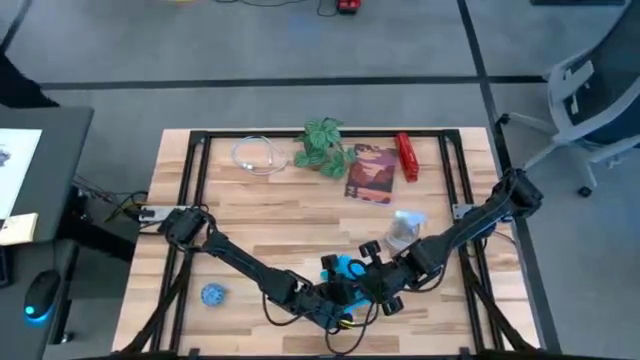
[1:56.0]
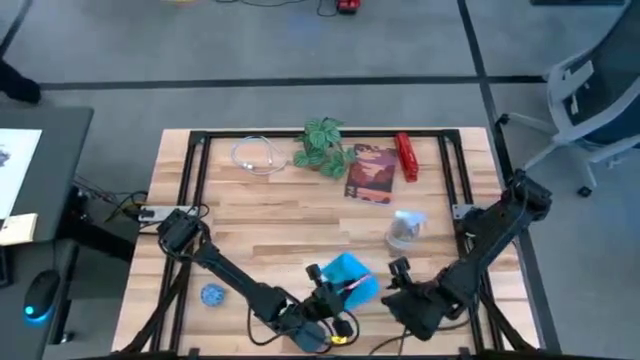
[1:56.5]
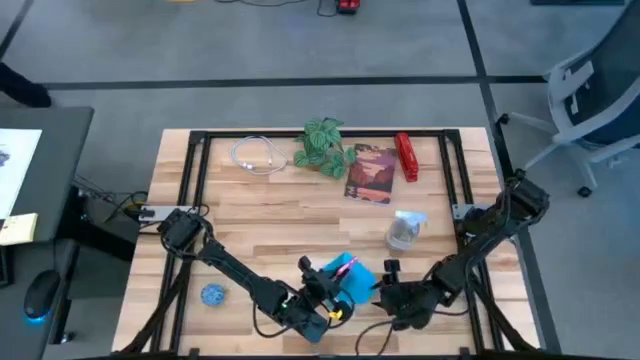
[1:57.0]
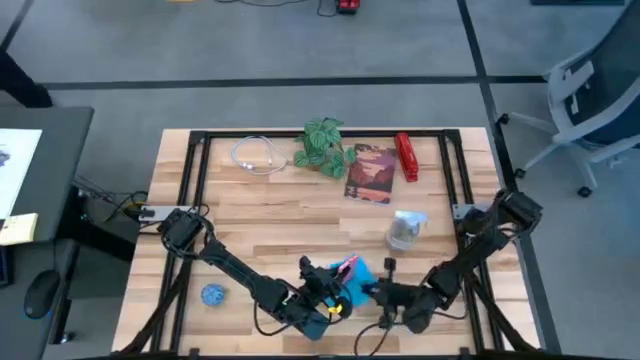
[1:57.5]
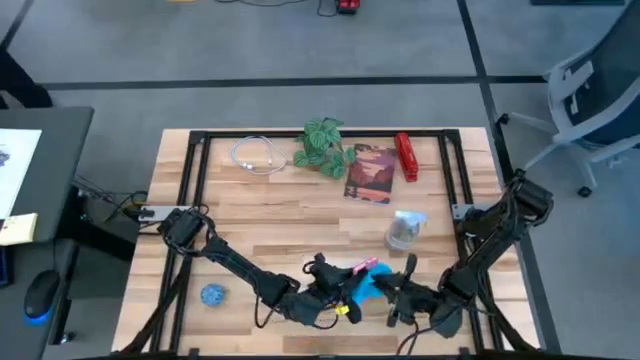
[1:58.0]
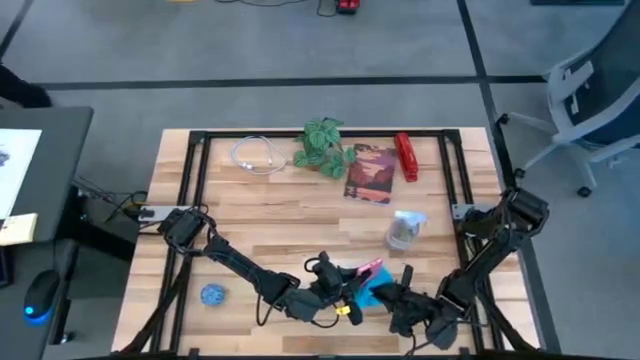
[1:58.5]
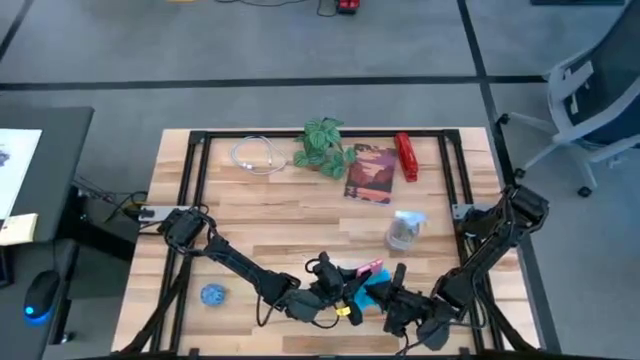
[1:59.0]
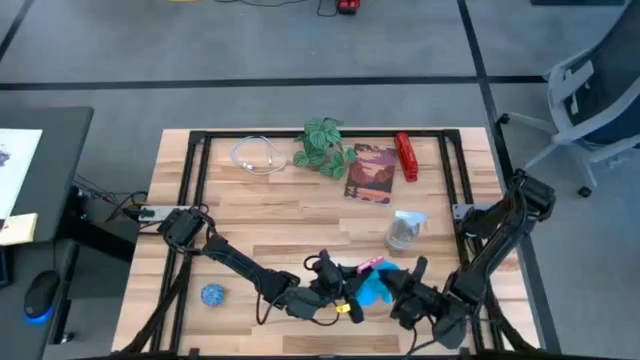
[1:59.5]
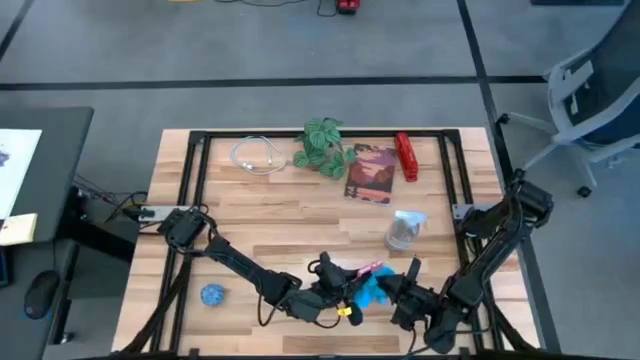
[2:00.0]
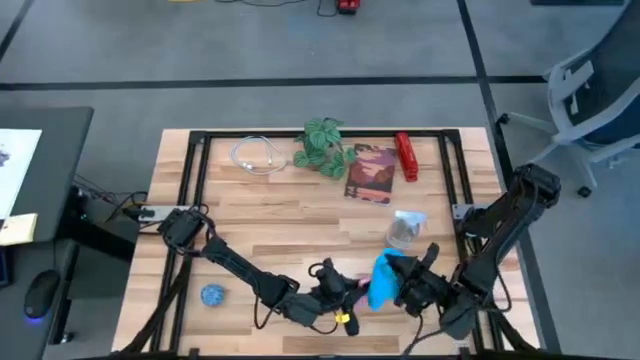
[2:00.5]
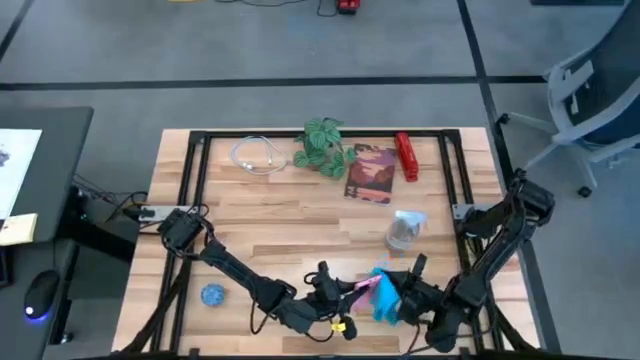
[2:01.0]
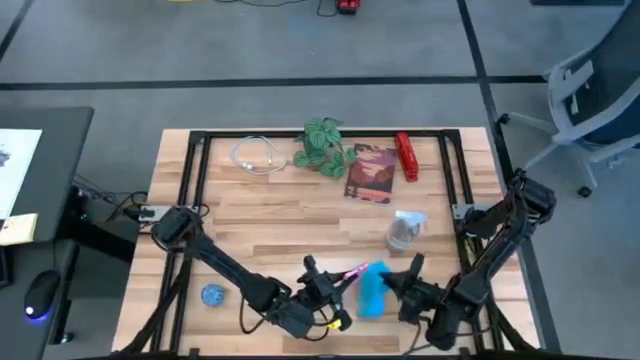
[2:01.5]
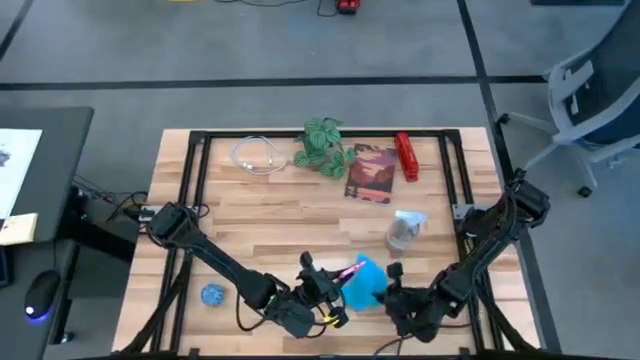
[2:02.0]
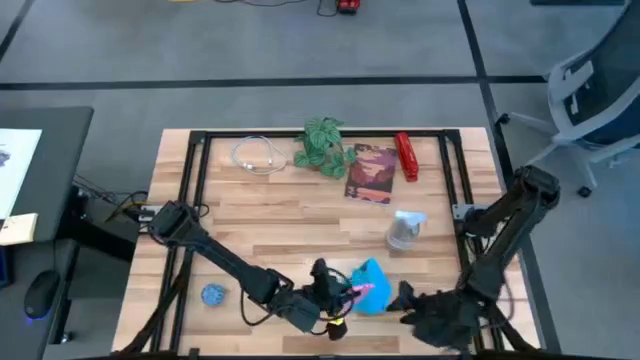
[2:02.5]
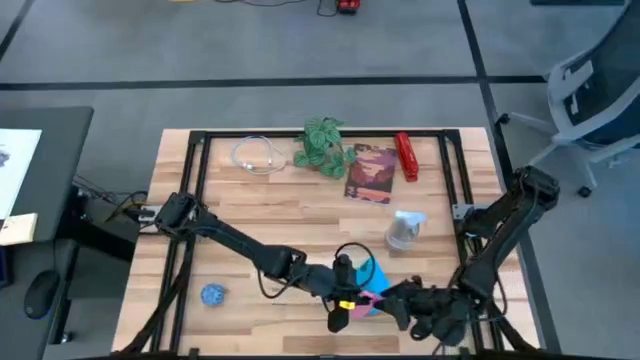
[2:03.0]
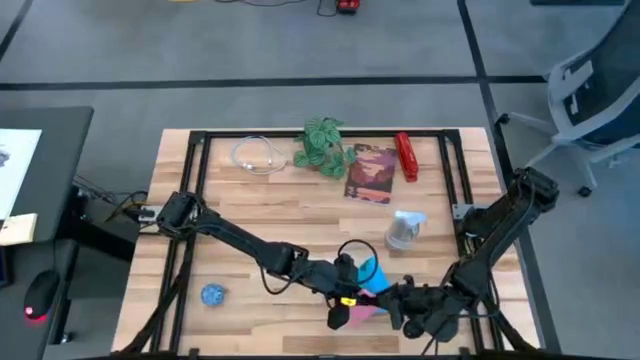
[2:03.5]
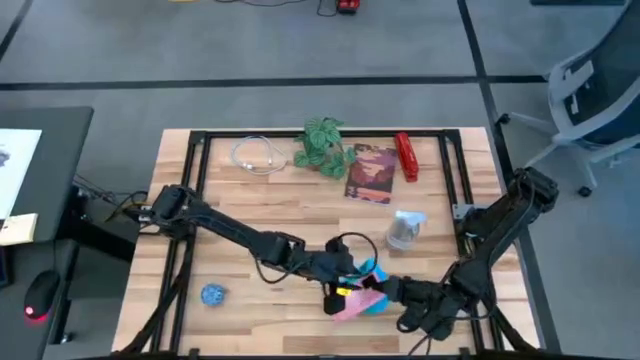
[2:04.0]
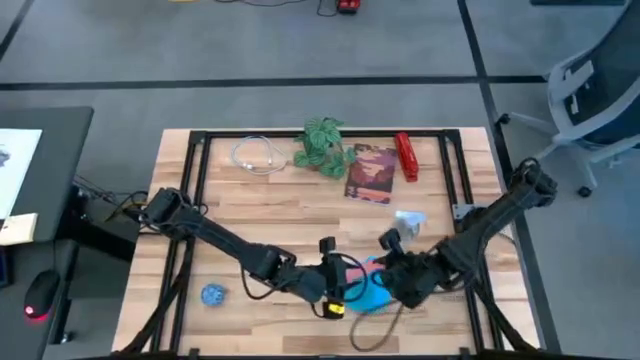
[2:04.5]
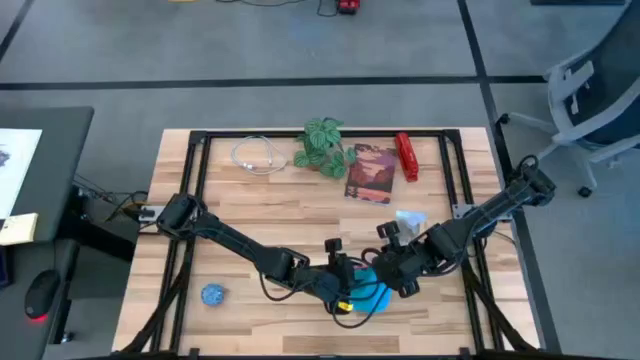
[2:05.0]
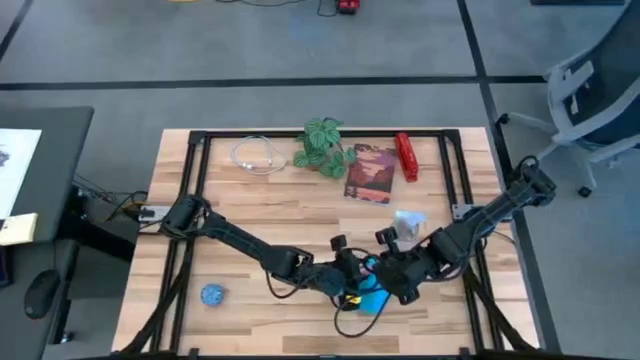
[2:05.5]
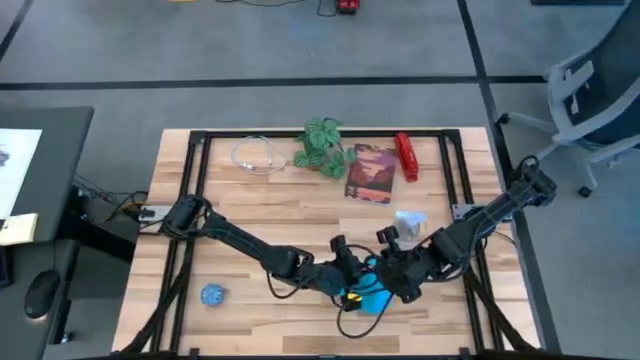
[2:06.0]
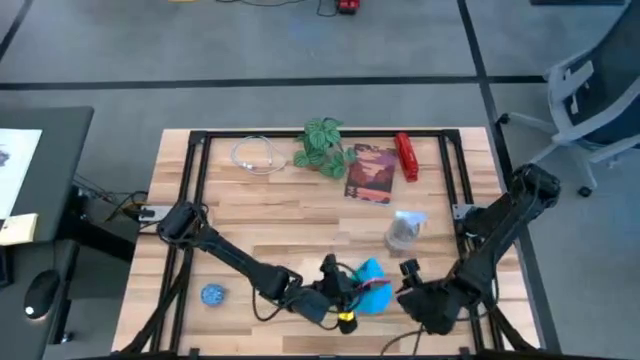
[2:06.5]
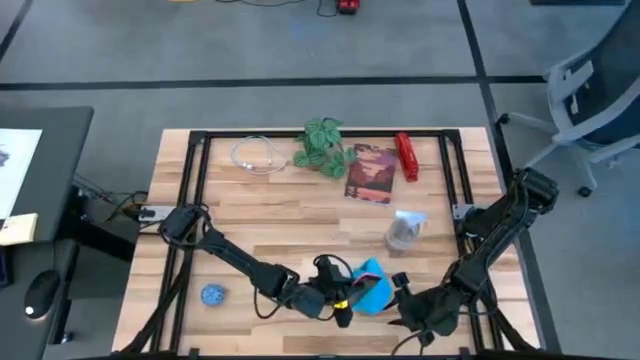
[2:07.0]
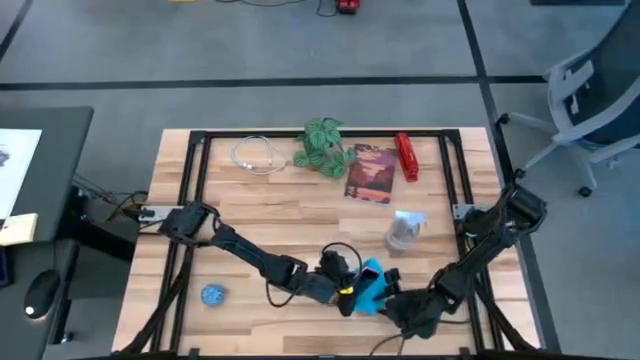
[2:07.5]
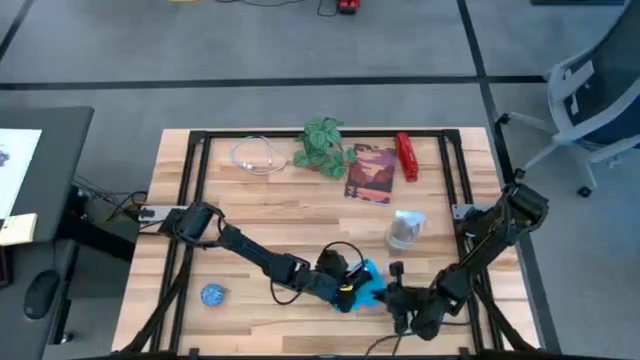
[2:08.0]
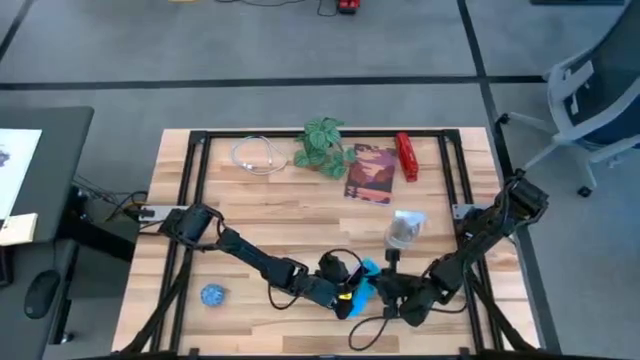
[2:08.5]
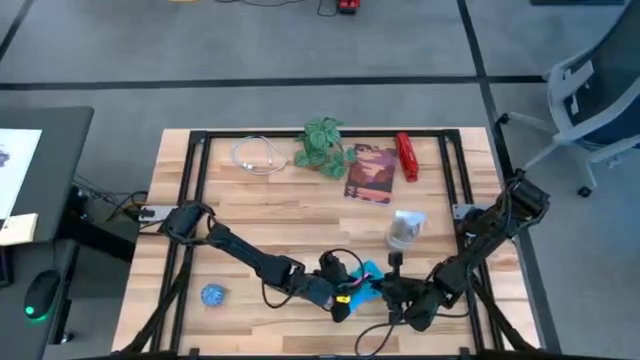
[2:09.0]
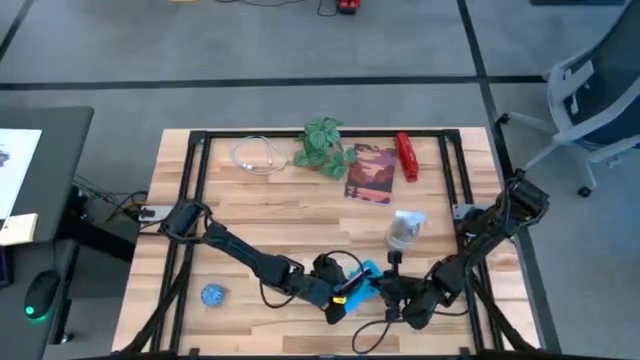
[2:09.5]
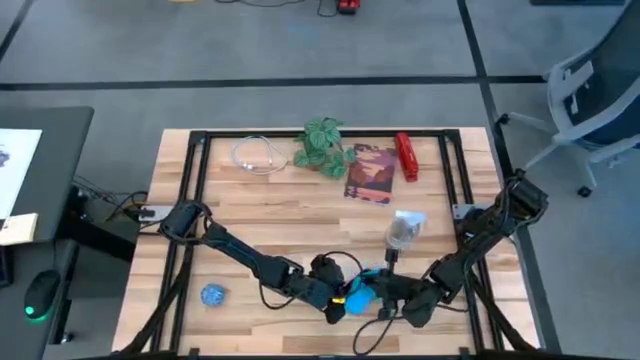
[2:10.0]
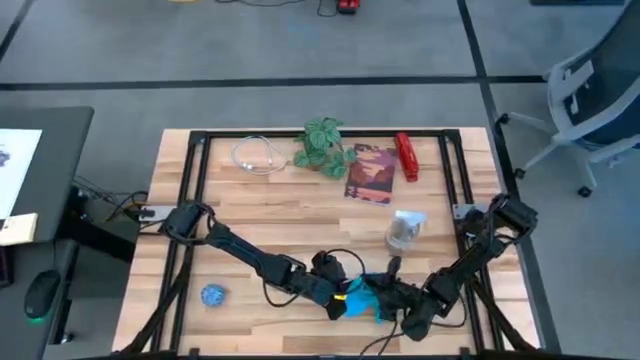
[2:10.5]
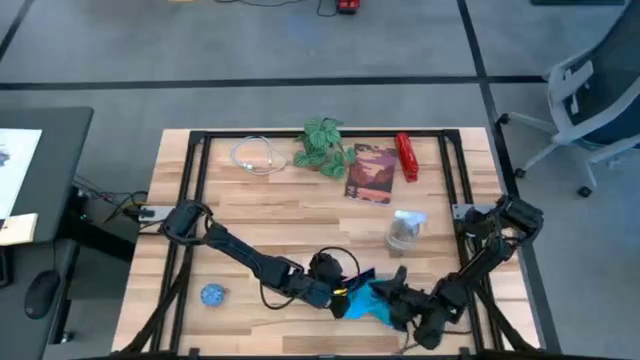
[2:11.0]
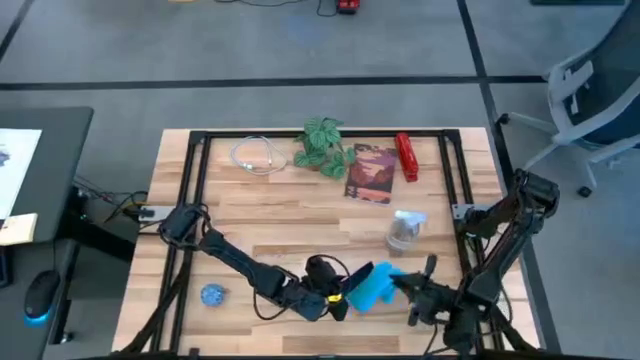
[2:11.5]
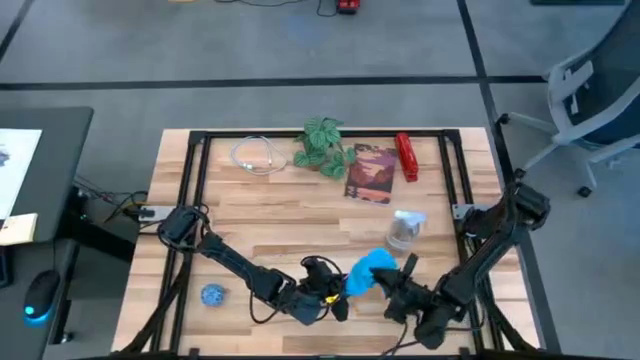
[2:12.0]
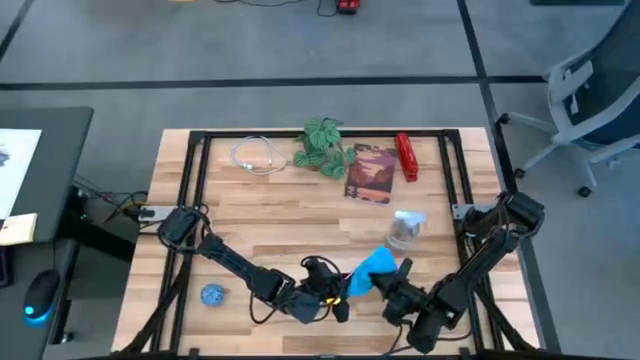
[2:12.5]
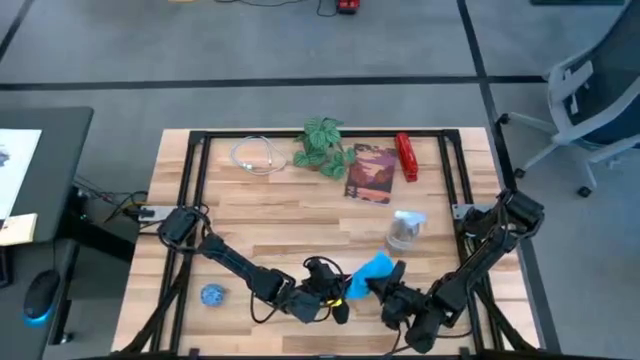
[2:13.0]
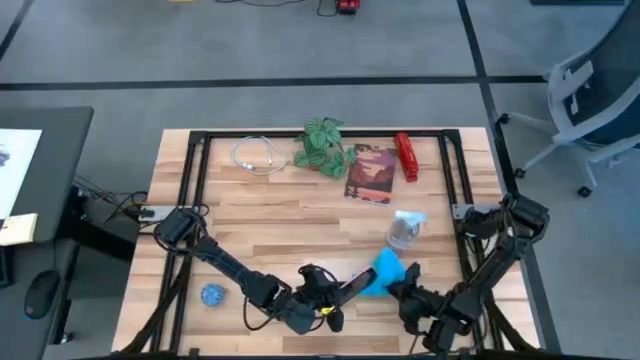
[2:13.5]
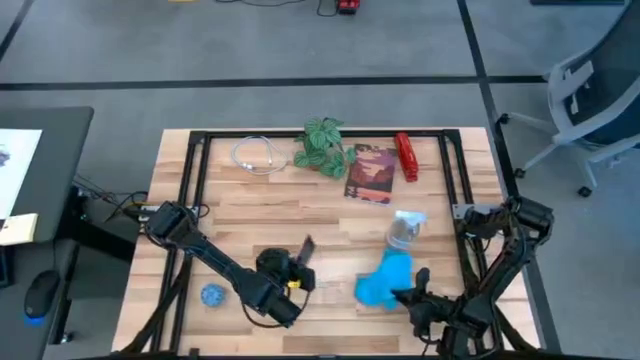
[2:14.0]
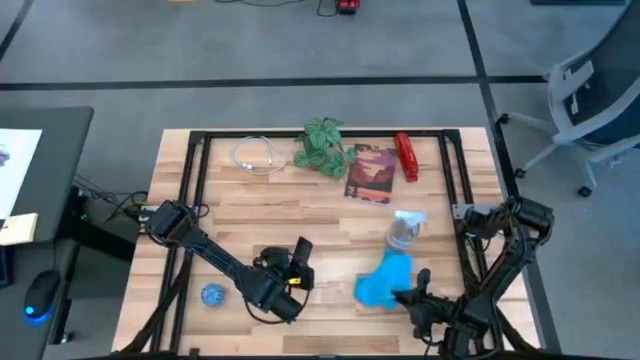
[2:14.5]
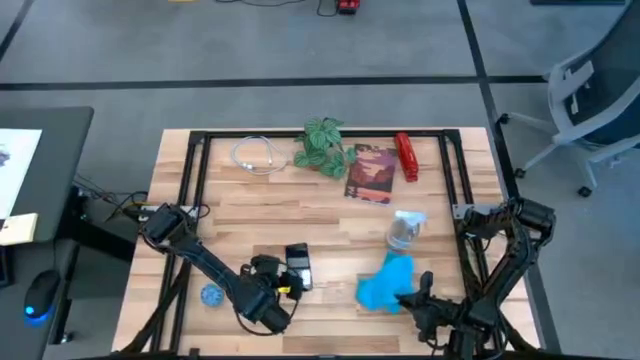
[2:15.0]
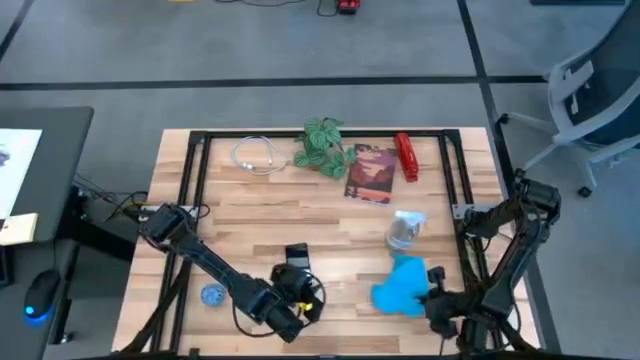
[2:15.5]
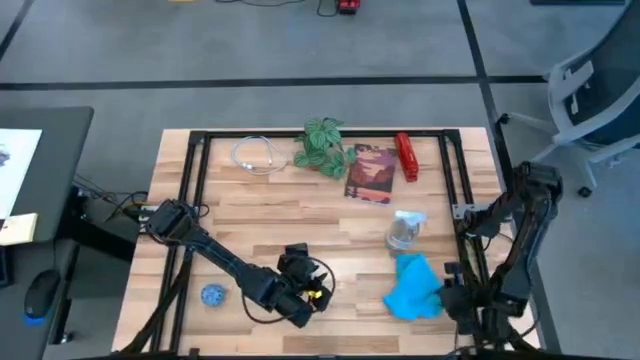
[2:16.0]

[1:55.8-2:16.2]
Task: Apply microfiber cloth
Wipe the back and front of the pink cellphone with the blue microfiber cloth

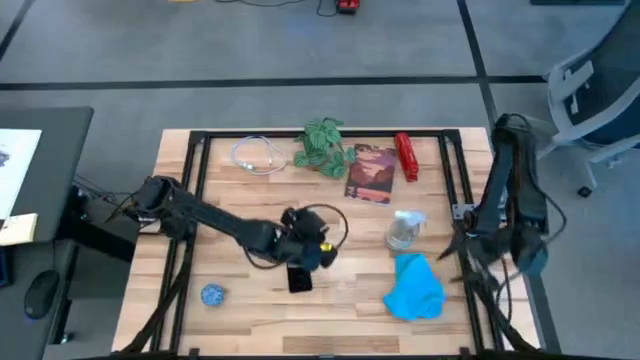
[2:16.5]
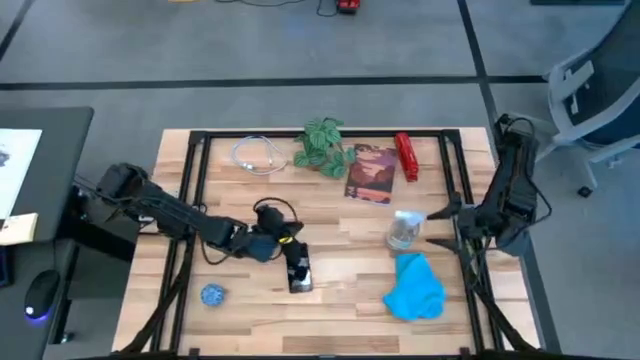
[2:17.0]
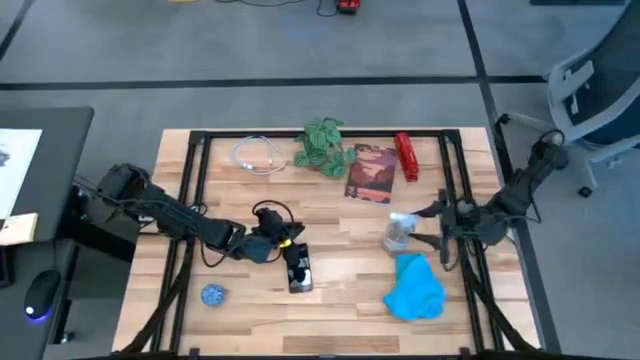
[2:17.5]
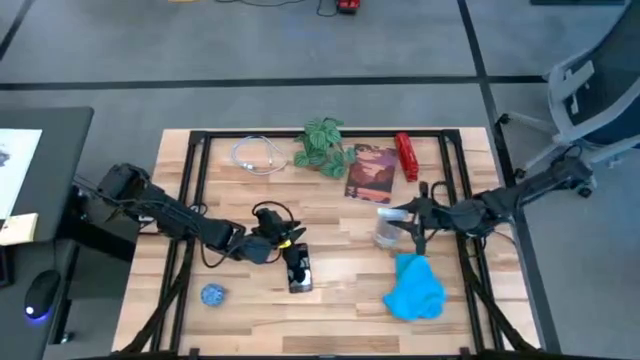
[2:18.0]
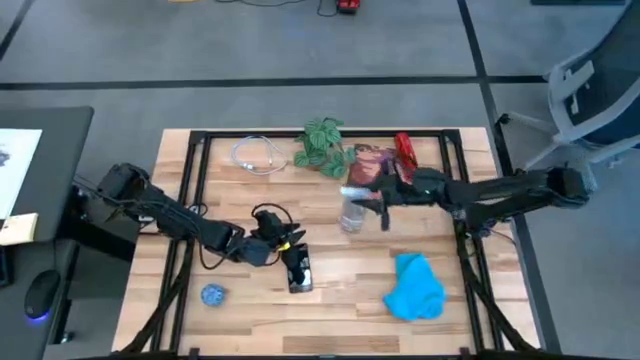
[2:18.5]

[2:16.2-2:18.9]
Move the transparent spray bottle to the center of the table
